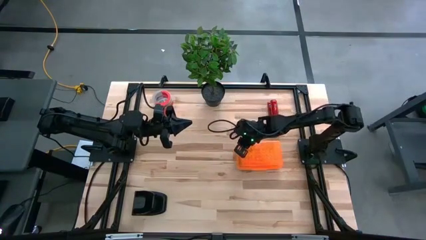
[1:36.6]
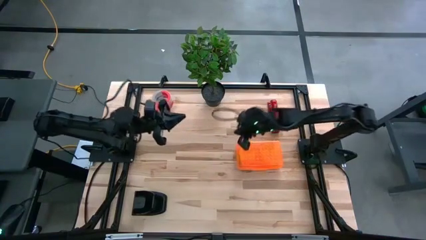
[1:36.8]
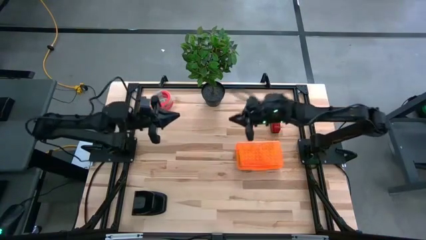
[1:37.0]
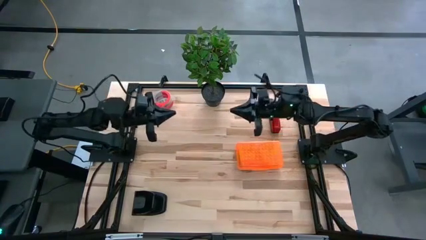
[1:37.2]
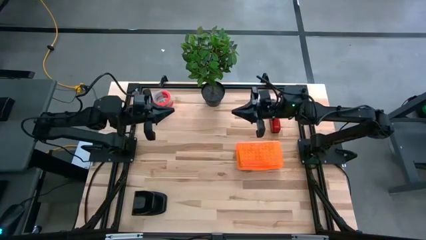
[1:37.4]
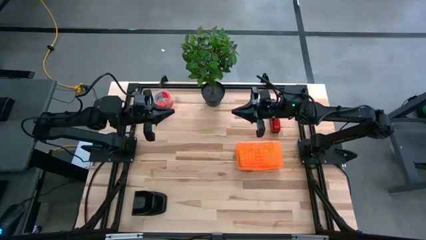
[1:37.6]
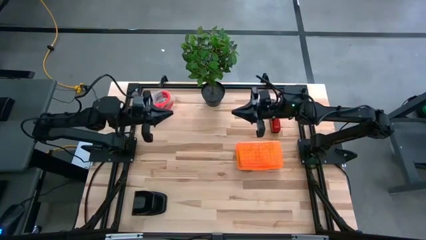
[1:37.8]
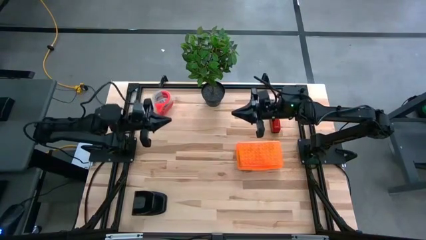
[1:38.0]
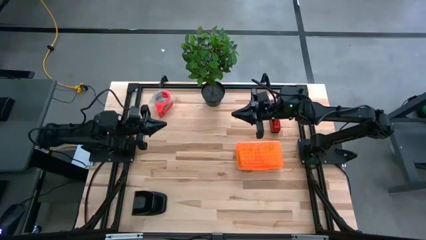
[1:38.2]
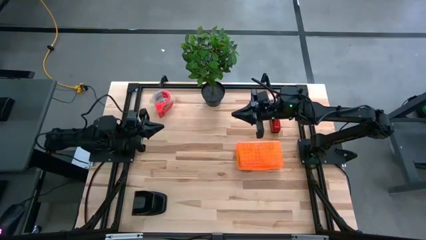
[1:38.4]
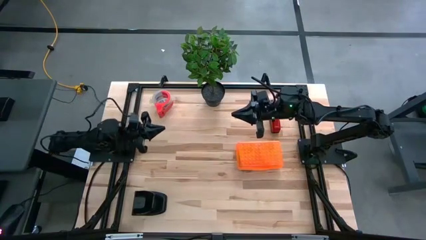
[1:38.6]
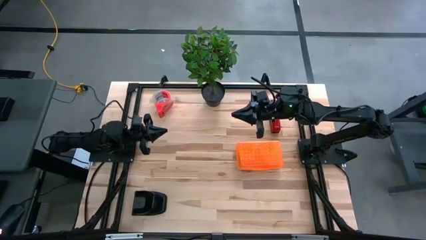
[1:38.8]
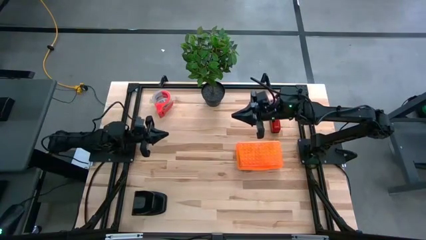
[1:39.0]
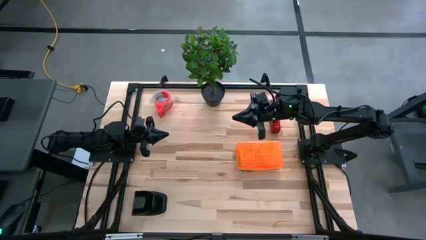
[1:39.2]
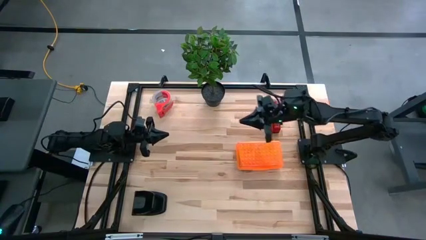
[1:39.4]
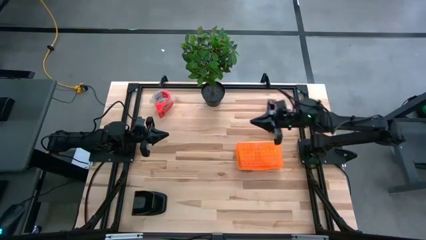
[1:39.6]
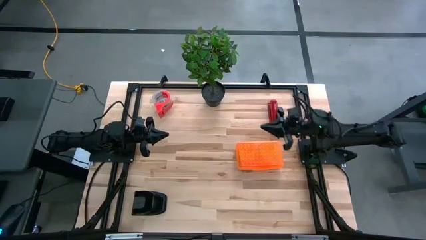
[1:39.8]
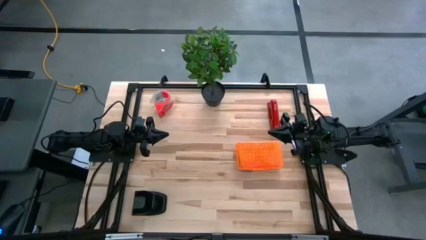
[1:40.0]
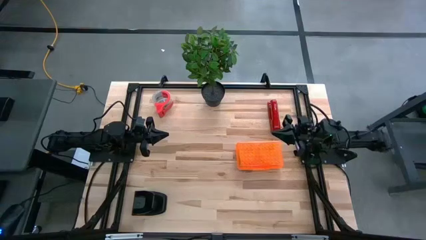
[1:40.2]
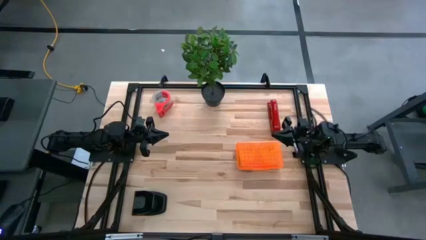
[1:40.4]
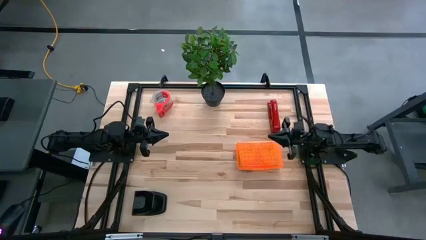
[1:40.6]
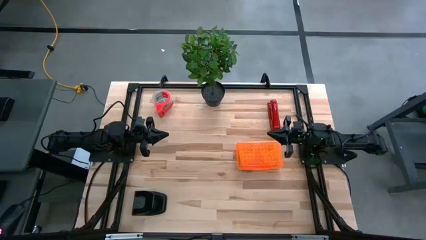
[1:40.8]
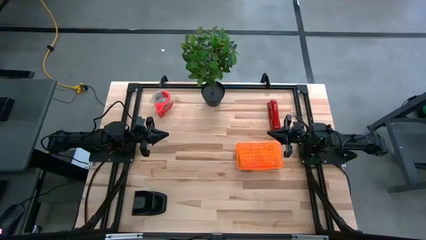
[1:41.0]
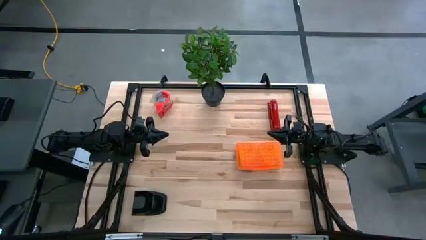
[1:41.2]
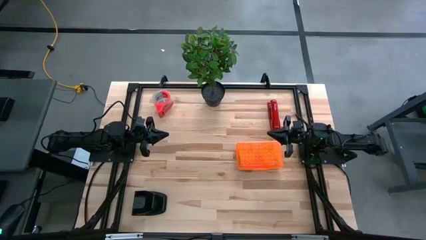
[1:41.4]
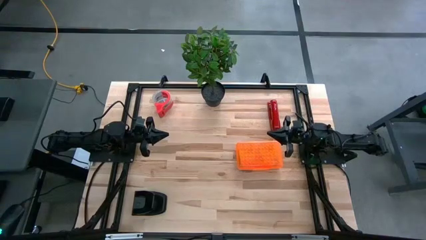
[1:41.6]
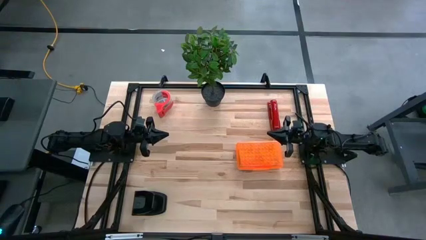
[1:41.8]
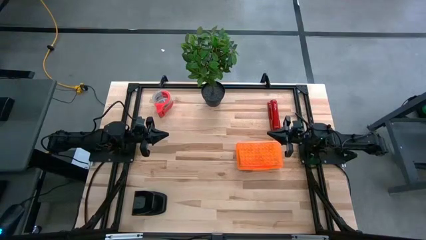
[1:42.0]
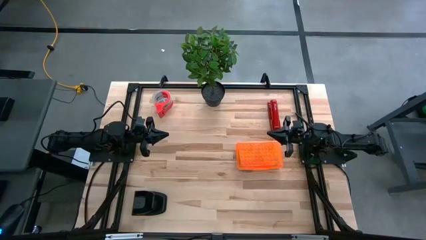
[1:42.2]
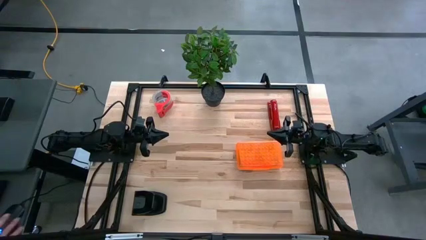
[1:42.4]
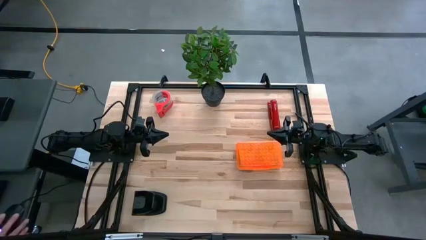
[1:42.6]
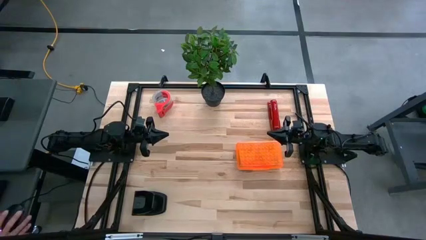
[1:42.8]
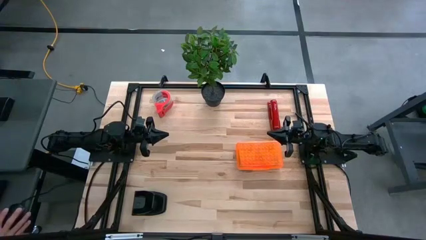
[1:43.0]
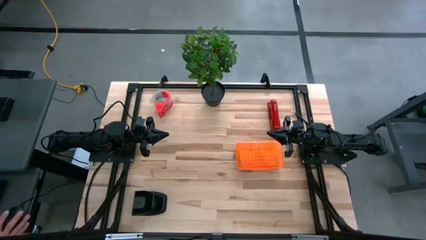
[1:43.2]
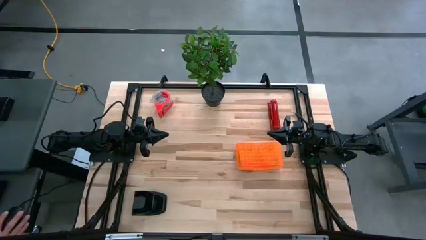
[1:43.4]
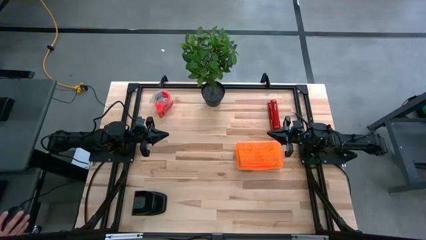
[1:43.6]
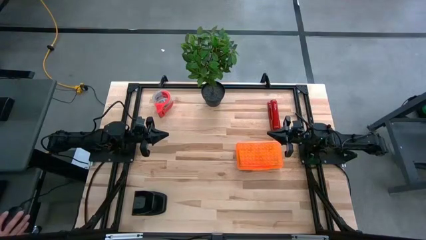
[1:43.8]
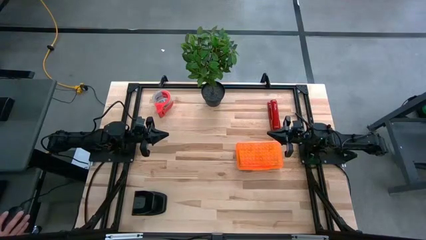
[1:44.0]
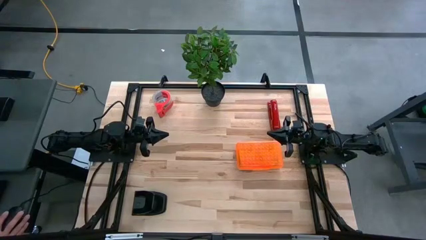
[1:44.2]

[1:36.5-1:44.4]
Task: Pack school essentials
Return to Home Position

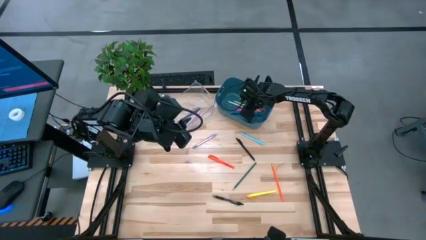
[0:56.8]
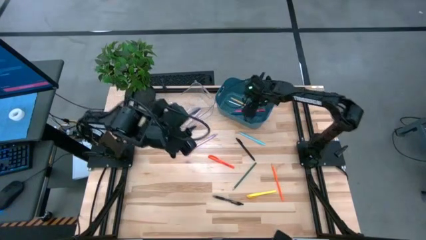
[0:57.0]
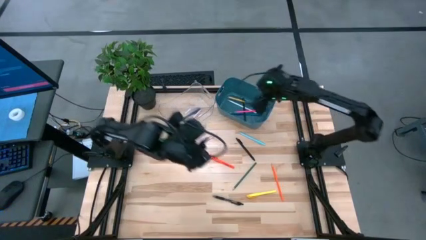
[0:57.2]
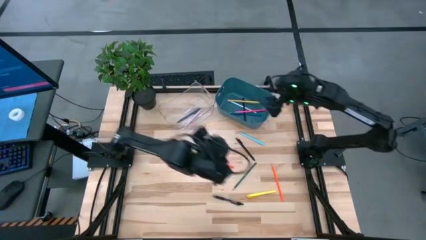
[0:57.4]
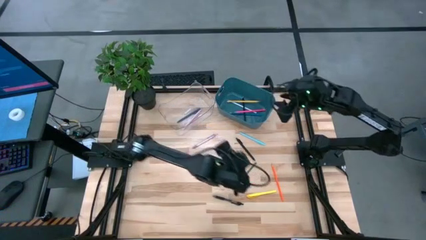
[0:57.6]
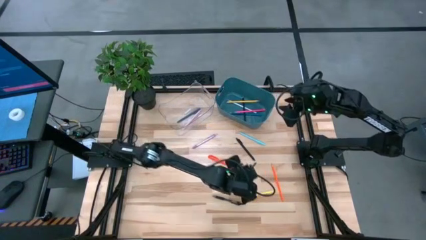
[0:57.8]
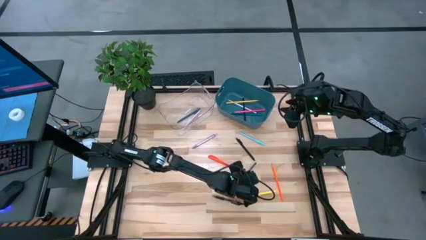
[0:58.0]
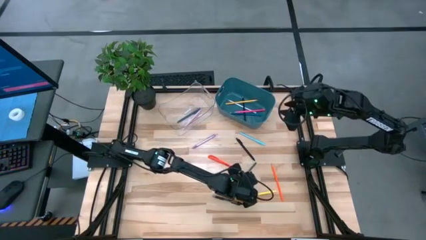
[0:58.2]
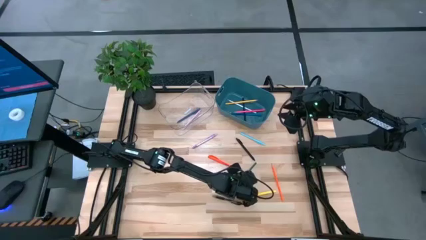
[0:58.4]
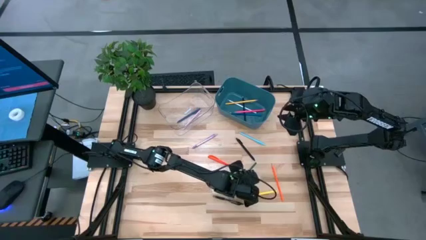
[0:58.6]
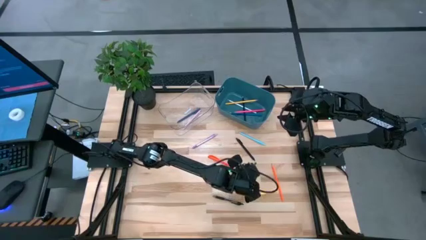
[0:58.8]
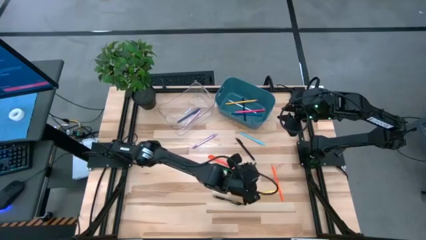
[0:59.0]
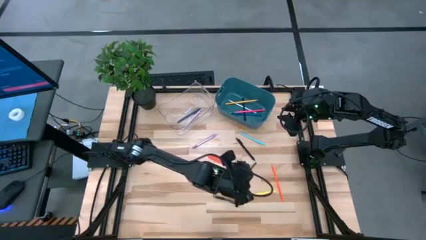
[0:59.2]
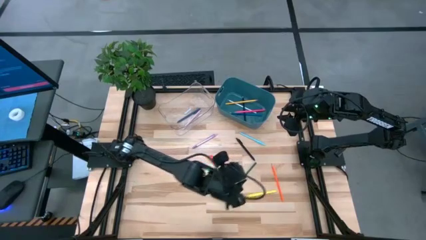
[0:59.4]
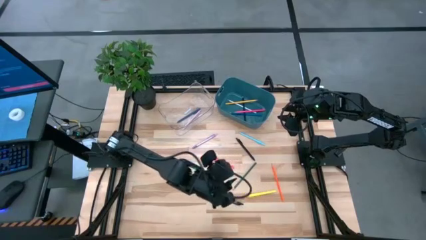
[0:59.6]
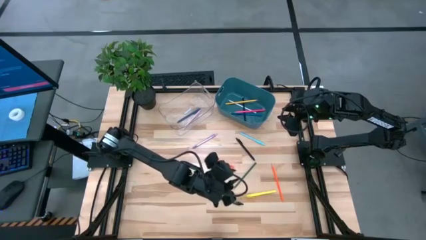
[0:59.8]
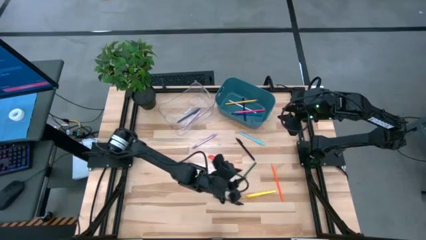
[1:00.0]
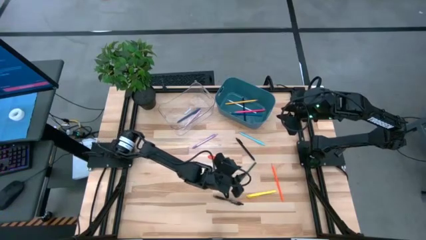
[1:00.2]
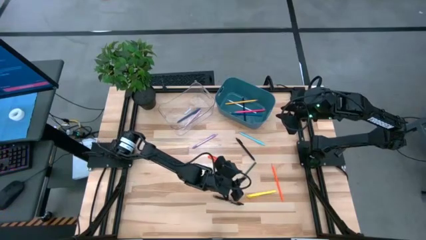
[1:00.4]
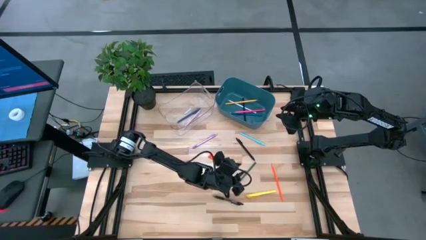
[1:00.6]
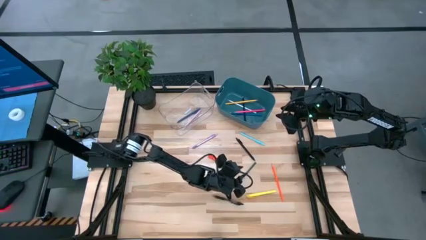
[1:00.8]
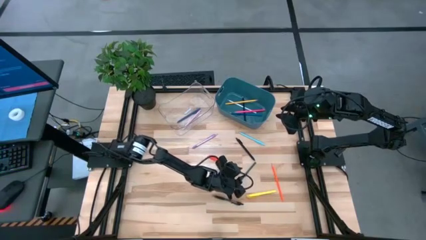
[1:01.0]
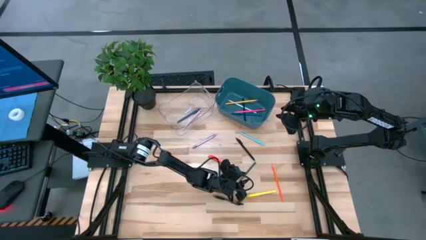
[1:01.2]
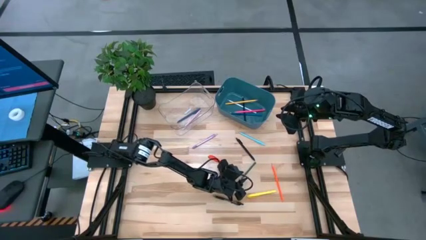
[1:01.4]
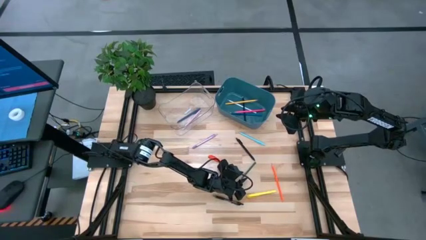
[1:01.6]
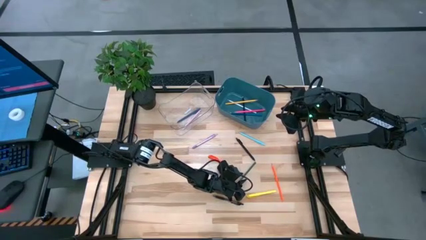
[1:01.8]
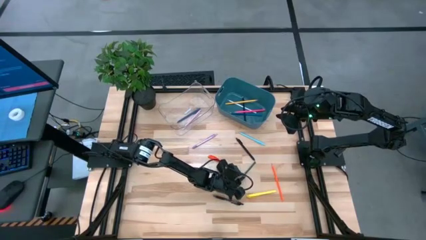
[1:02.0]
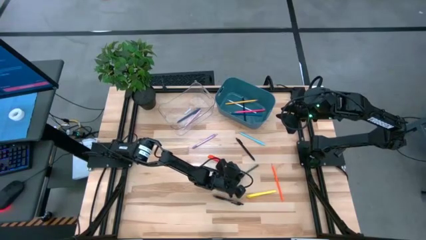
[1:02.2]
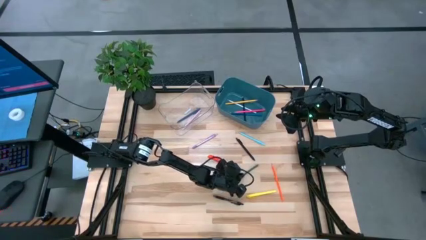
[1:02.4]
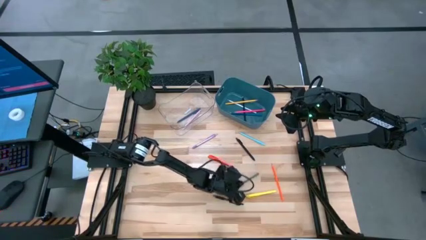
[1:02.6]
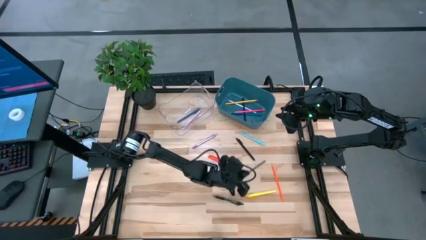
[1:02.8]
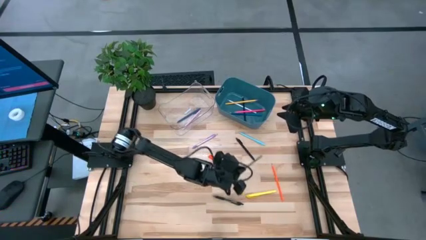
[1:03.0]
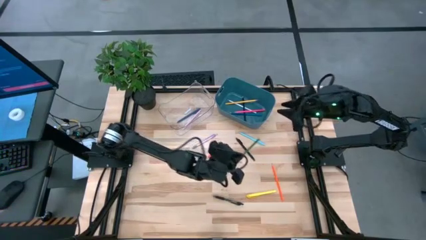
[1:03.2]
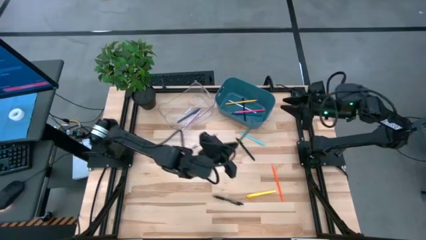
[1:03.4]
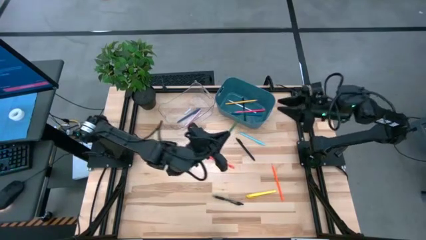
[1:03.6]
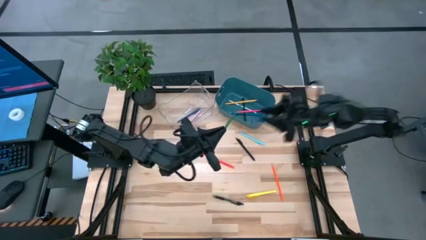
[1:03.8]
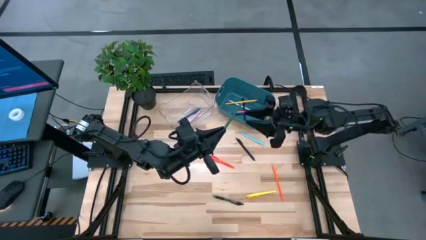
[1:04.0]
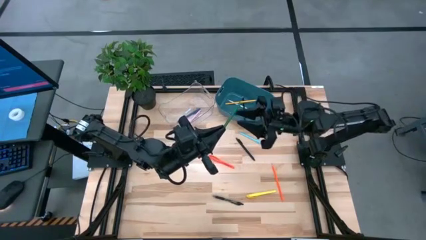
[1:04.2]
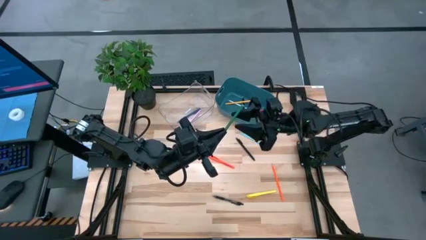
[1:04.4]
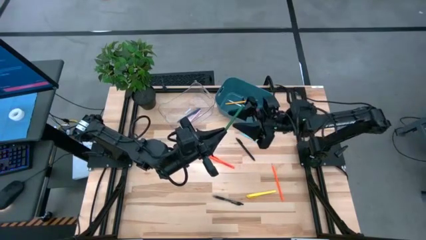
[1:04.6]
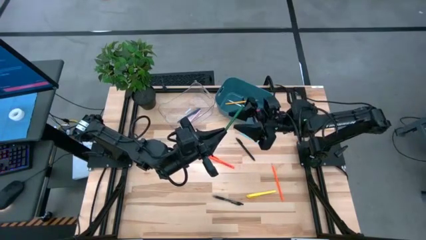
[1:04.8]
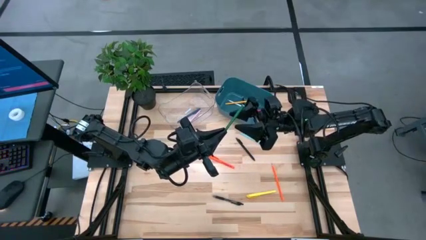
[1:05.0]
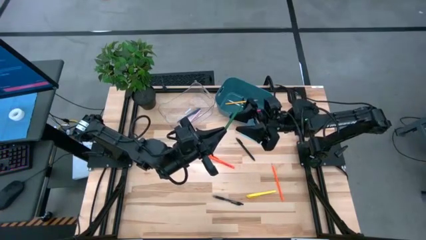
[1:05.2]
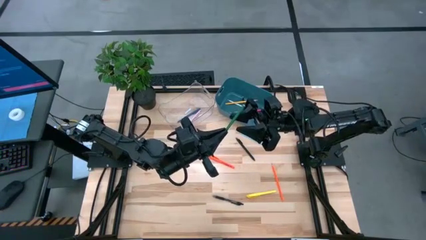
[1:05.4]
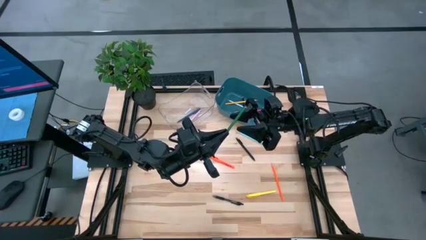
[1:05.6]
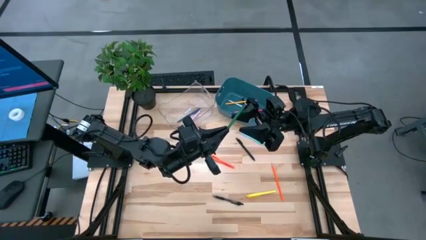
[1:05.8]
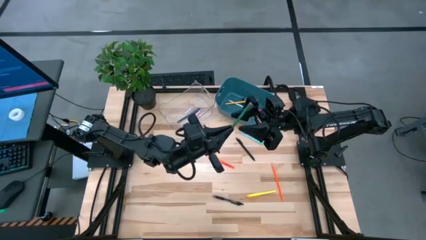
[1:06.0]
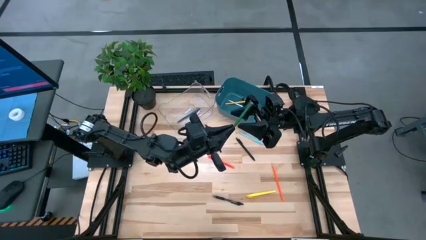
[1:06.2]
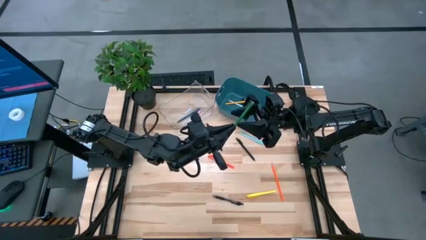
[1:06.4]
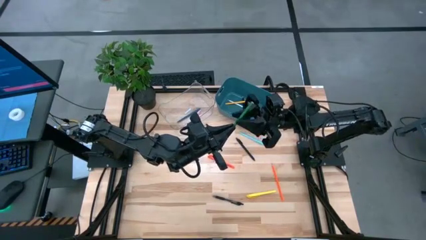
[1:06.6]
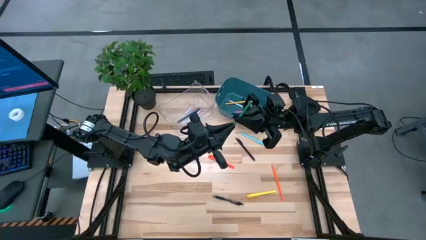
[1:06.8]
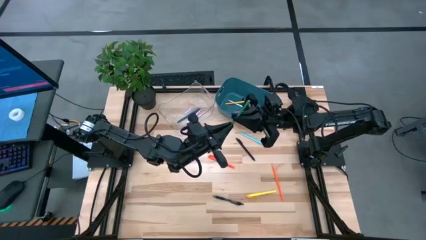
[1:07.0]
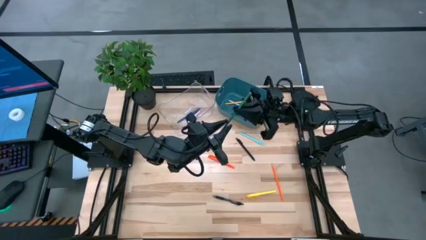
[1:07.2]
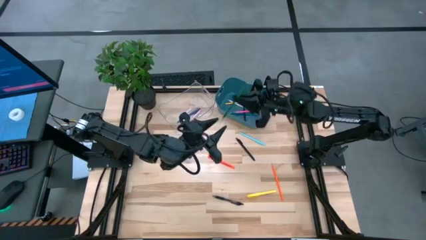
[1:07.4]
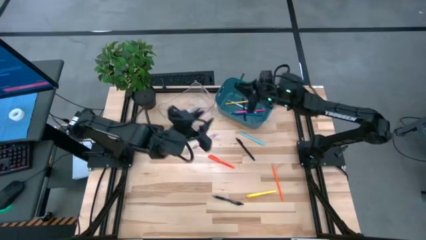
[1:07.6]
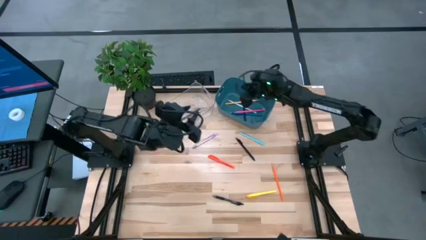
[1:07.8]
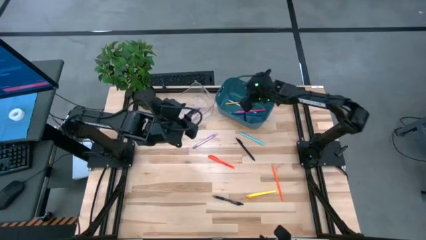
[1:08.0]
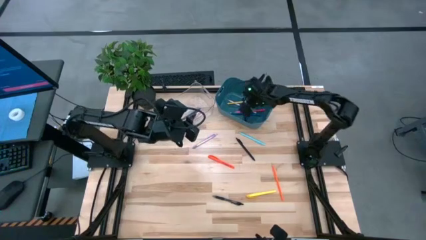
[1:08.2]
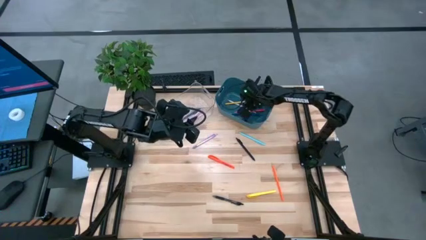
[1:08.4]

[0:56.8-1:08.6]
Task: Sort pens & pencils
Put the green colored pencil into the blue bin
